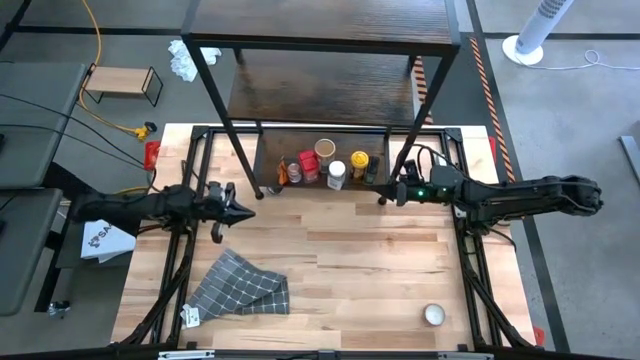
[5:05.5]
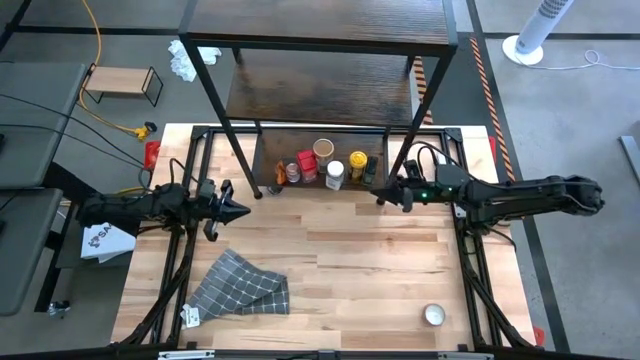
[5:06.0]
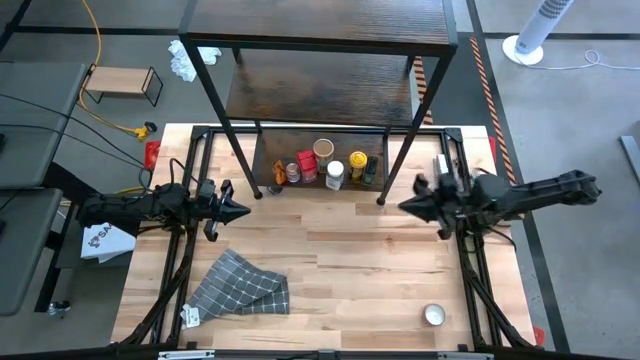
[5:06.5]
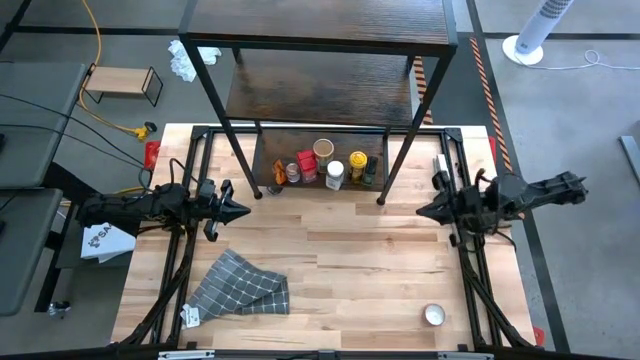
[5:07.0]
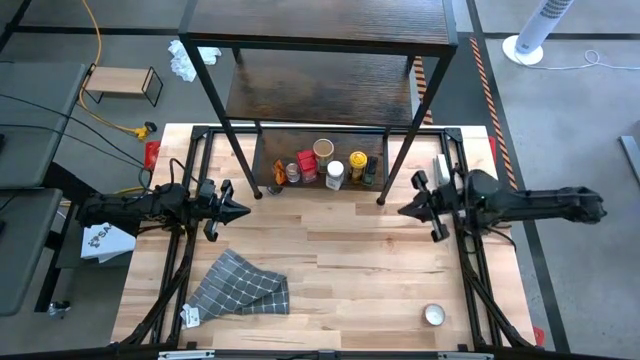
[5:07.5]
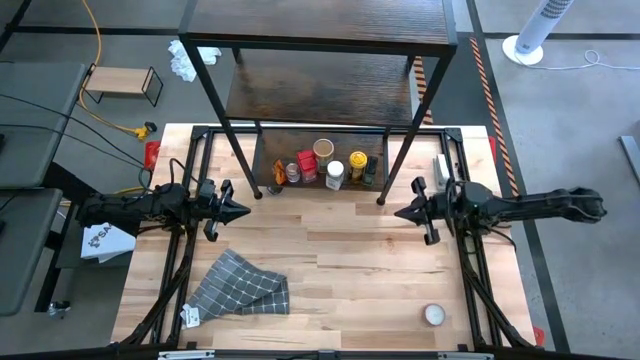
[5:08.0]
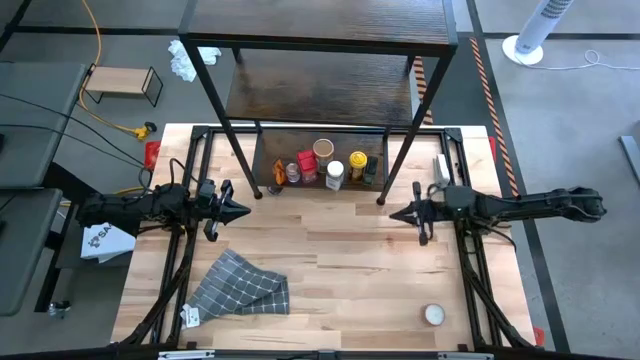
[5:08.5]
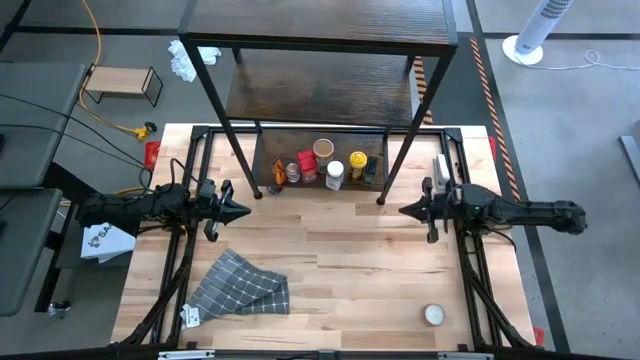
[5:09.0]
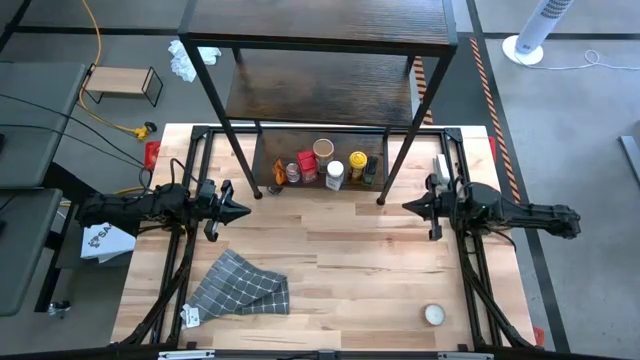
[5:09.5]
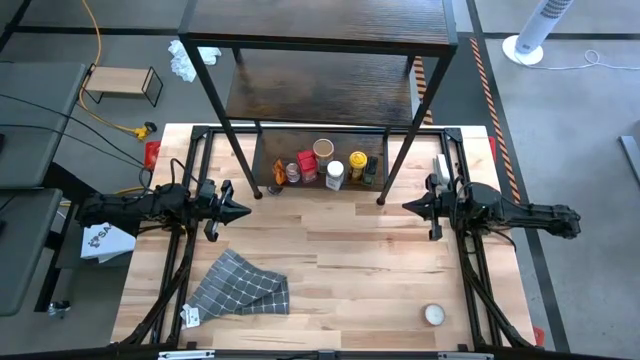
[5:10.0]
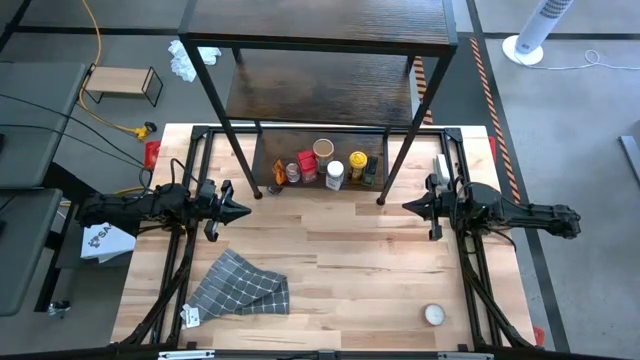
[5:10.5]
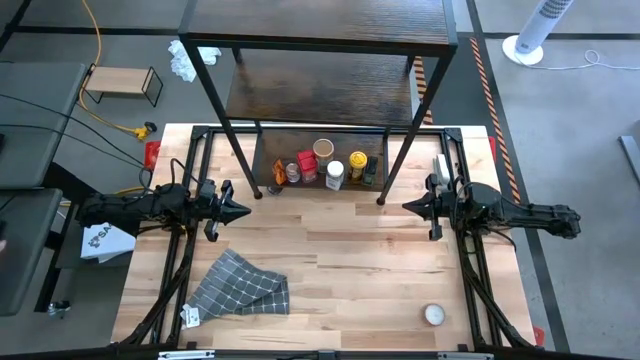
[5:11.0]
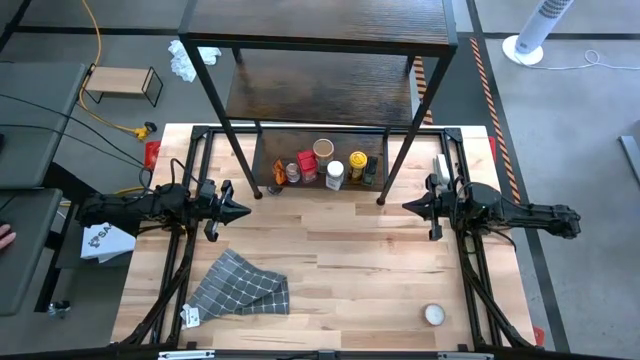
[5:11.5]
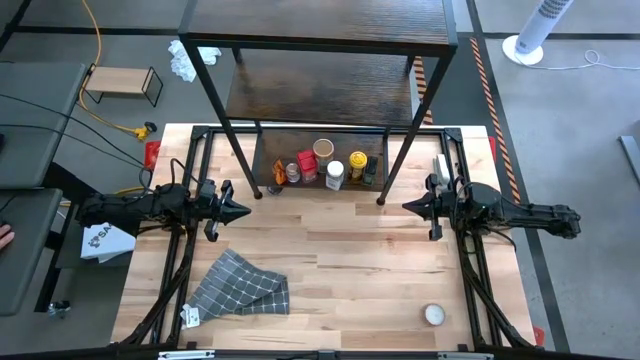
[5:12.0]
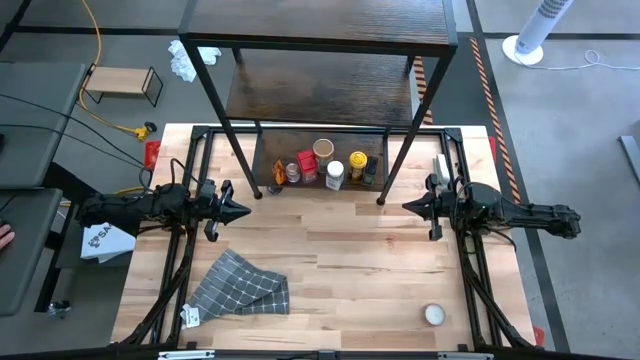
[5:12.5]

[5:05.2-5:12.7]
Task: Shelf spices
Return to Home Position

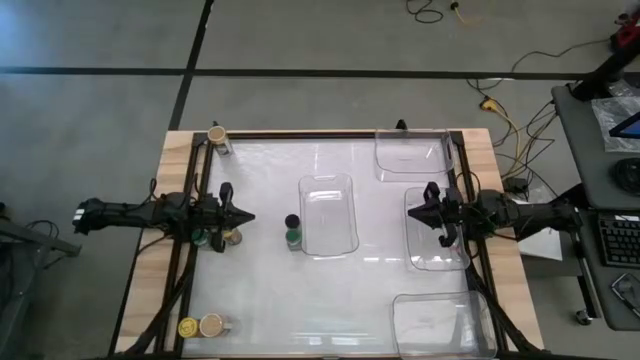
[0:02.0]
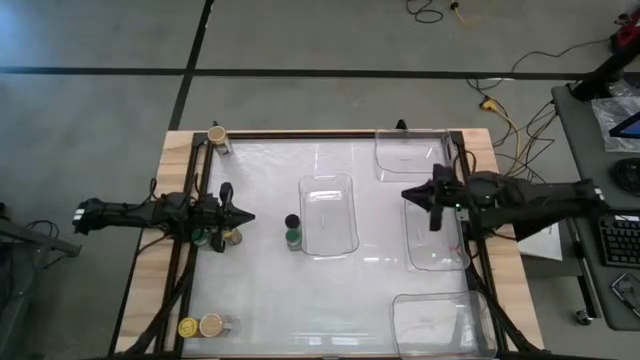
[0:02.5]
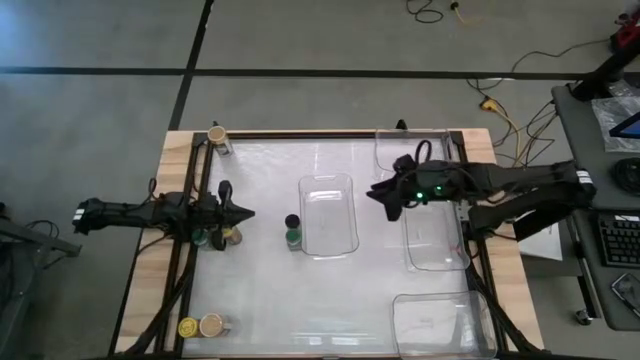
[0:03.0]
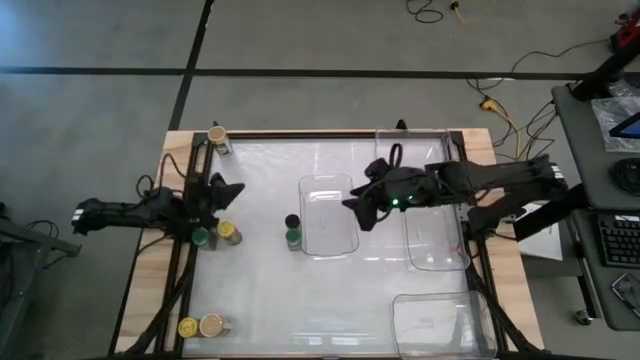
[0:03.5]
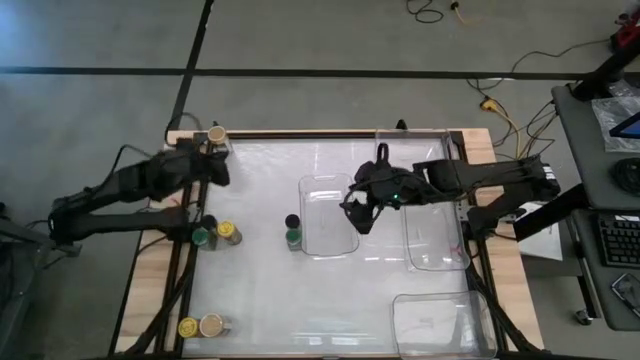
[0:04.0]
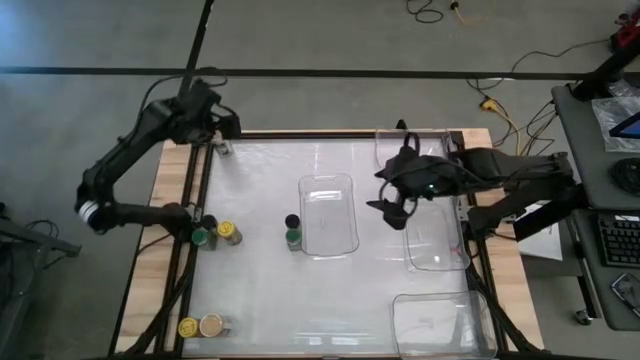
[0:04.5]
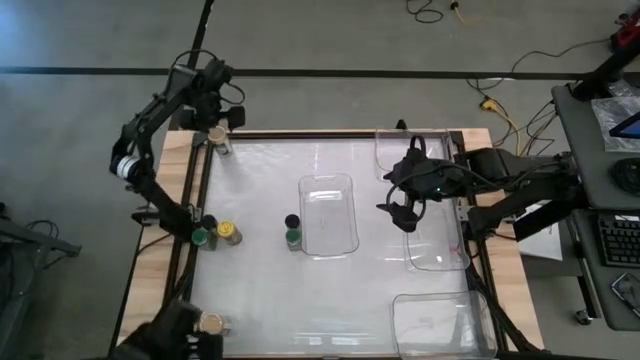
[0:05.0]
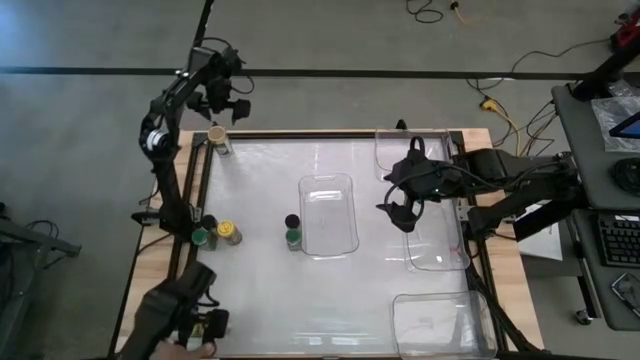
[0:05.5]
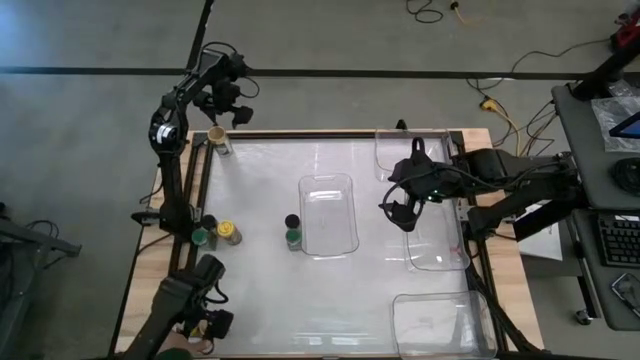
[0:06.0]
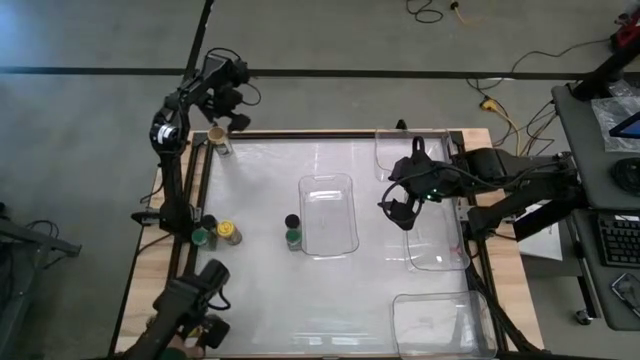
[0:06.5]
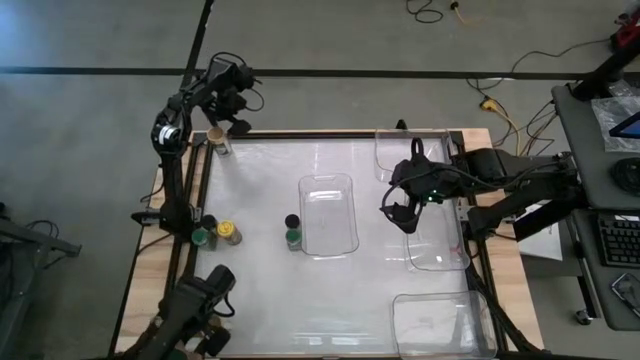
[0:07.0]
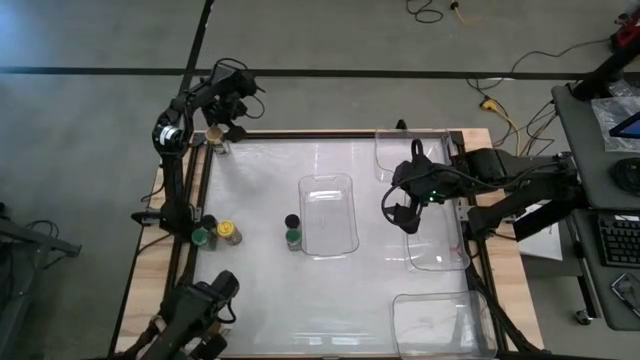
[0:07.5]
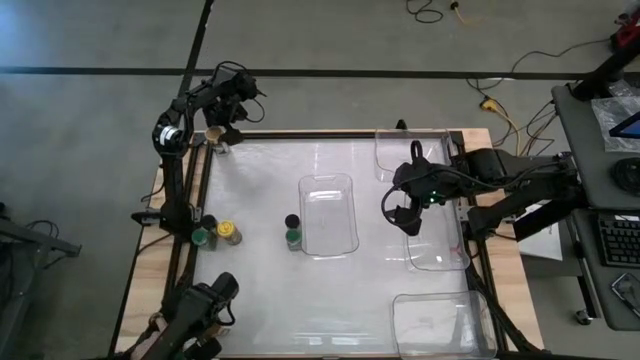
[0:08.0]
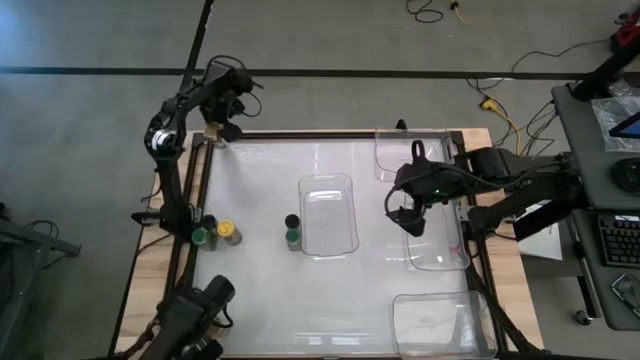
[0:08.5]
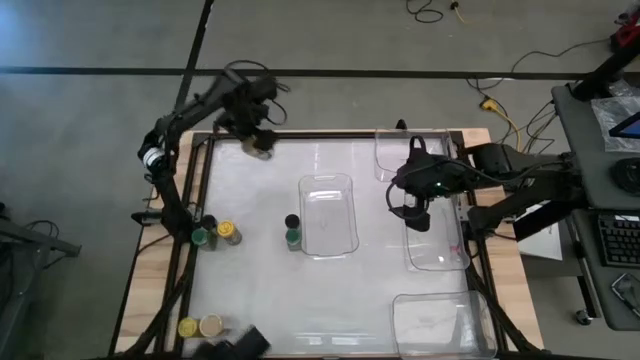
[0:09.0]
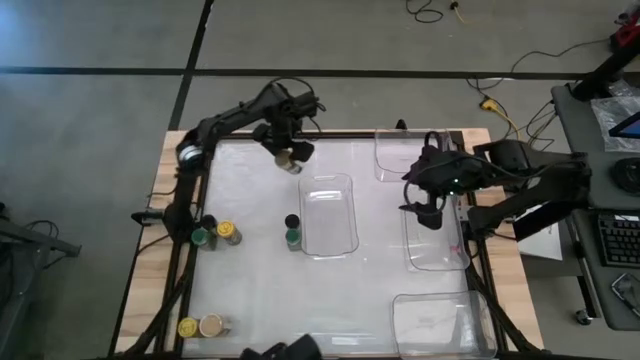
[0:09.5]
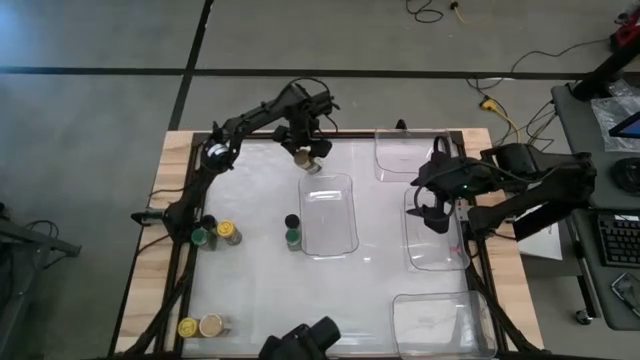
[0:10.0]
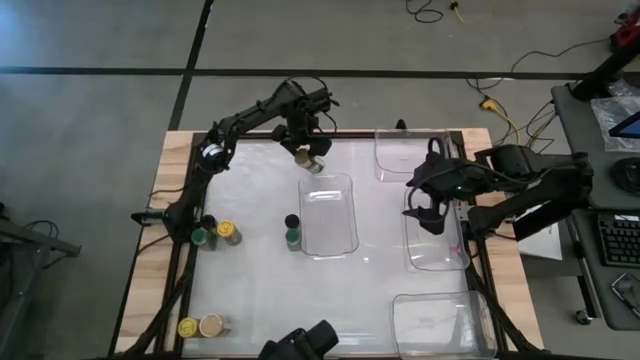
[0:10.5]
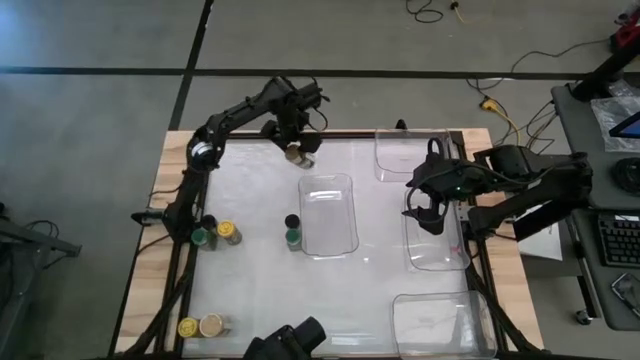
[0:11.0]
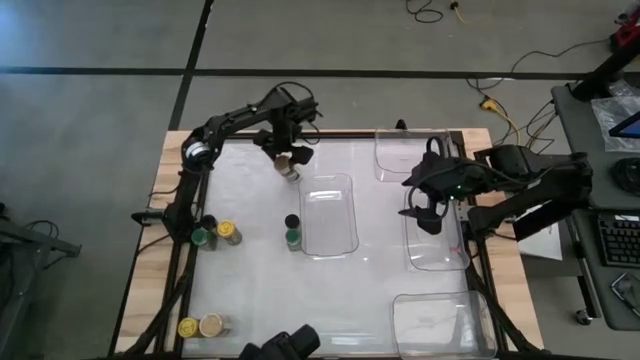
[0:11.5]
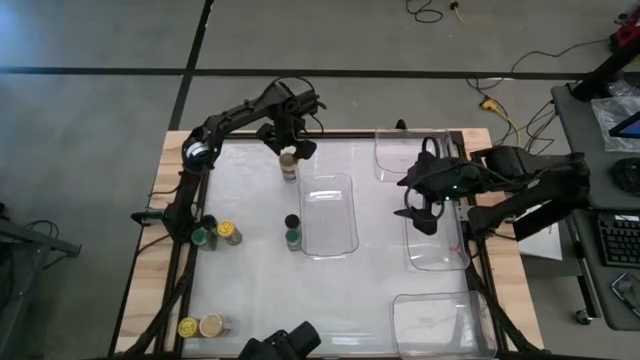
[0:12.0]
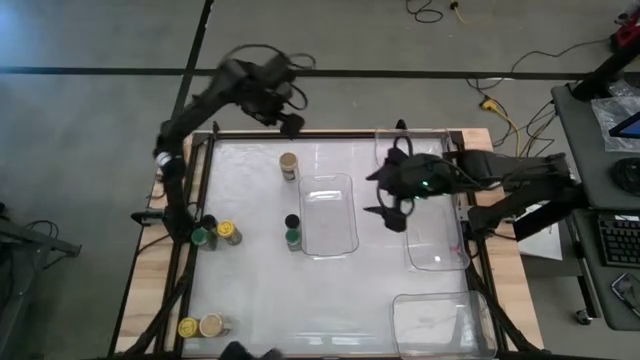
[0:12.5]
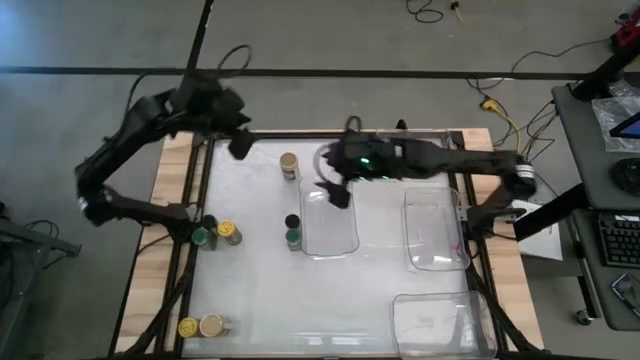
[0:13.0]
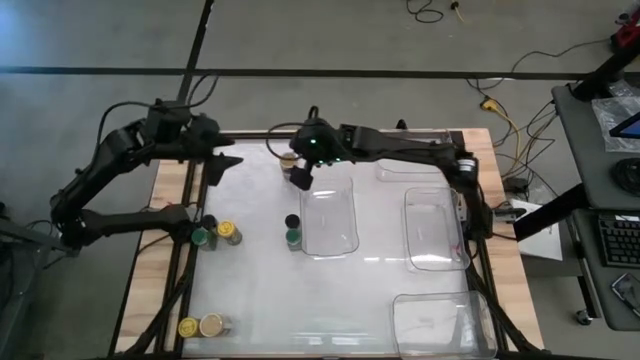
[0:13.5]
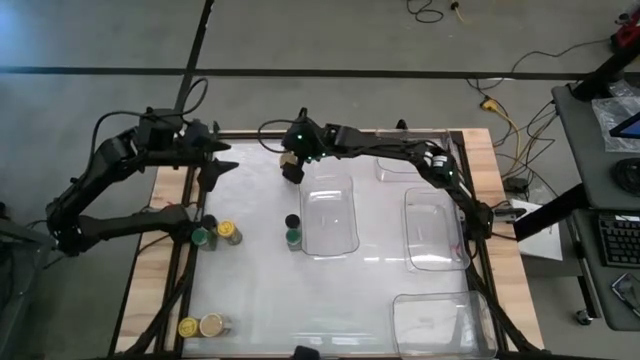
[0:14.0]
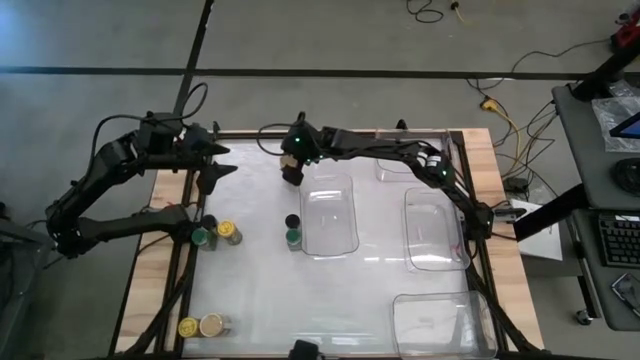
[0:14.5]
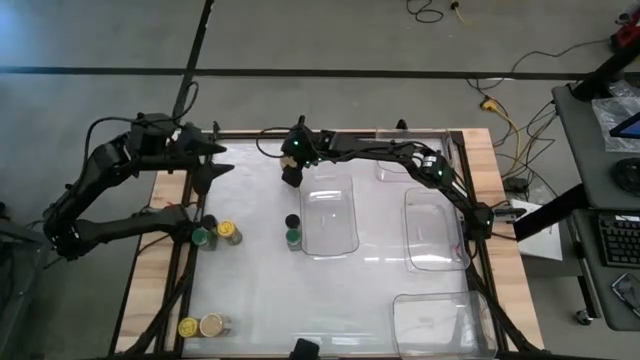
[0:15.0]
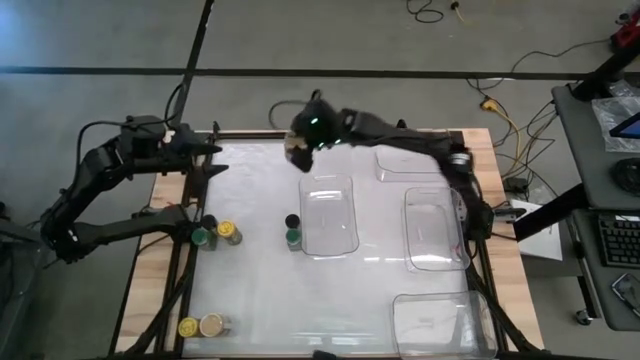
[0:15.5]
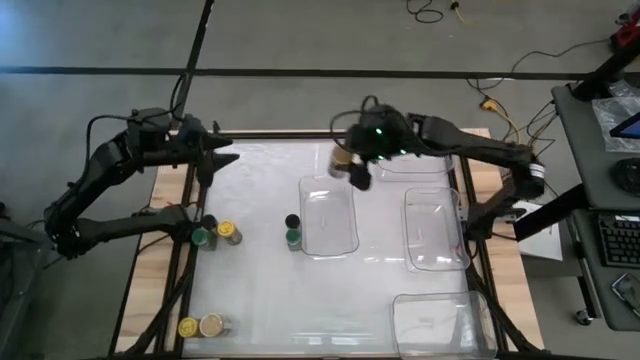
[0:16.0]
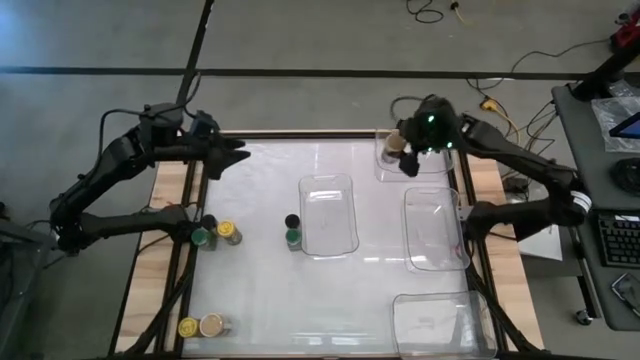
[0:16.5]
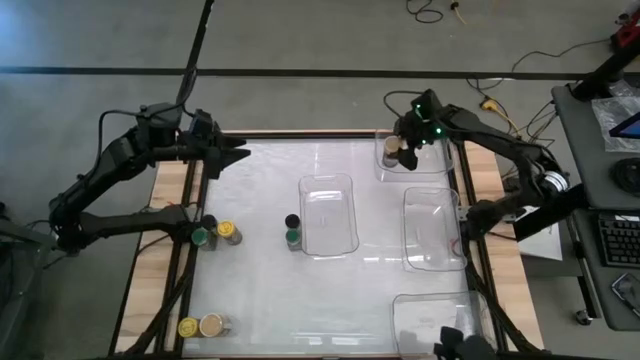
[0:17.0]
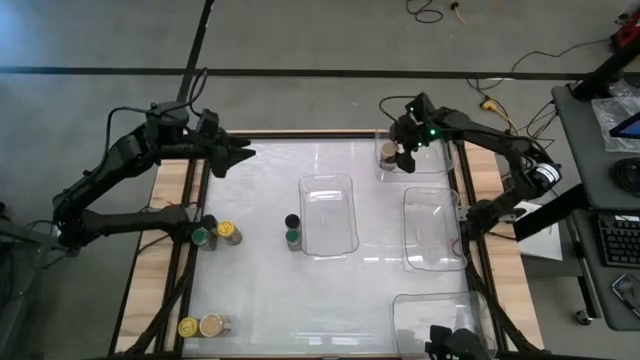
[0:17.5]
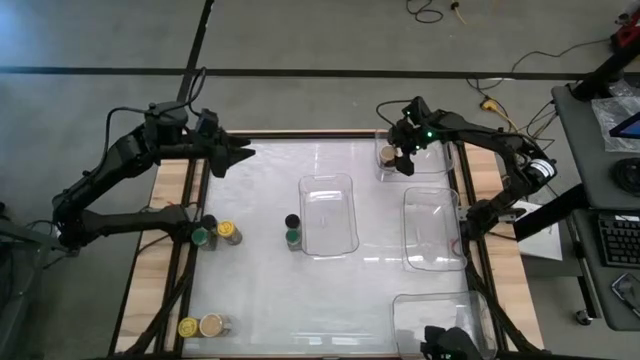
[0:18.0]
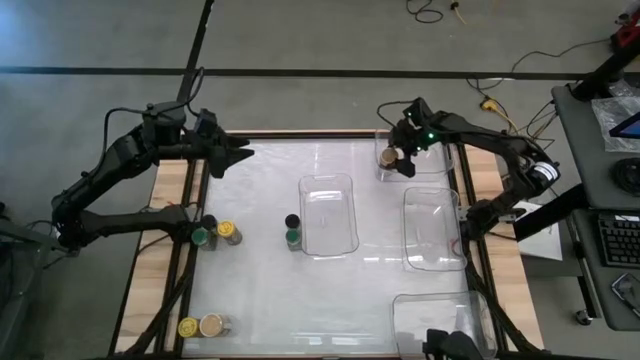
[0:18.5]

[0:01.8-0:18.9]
Task: Sort spices by type
Put the top gold seasoning bottle into the top right transparent bin
